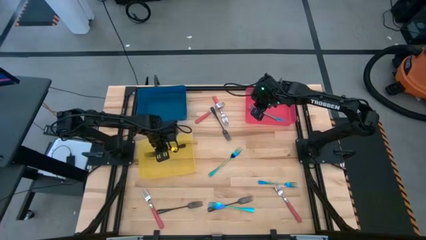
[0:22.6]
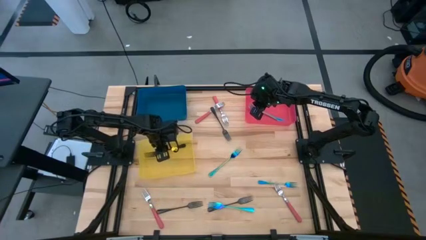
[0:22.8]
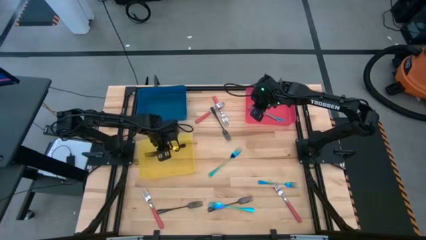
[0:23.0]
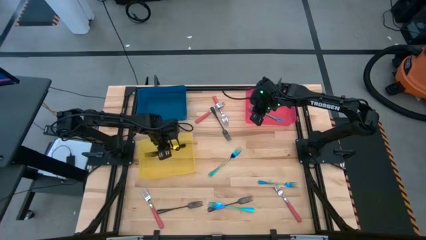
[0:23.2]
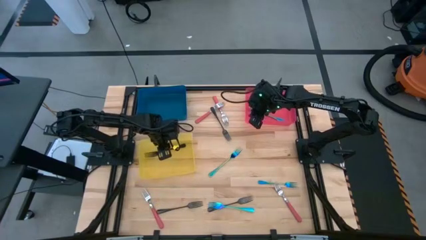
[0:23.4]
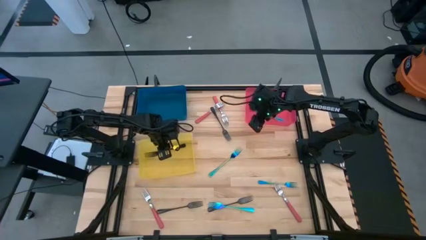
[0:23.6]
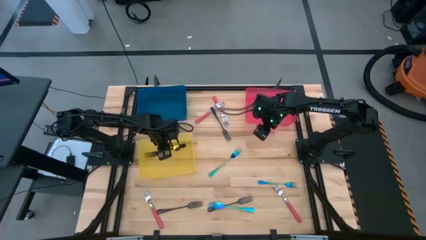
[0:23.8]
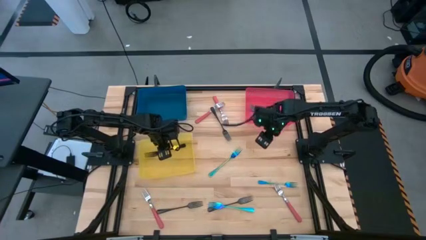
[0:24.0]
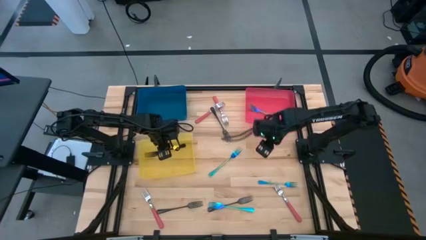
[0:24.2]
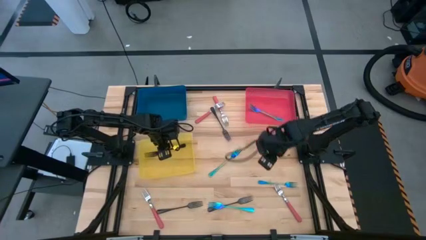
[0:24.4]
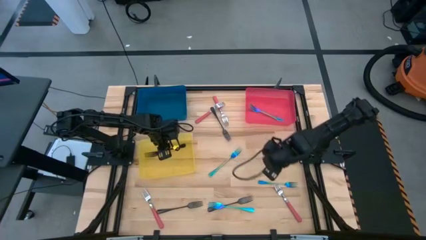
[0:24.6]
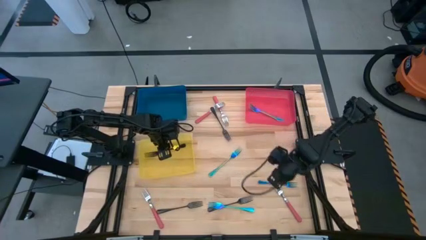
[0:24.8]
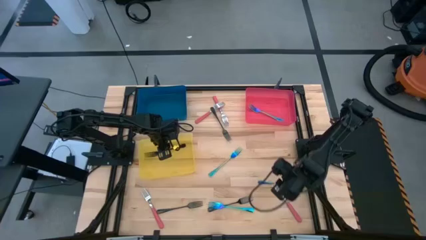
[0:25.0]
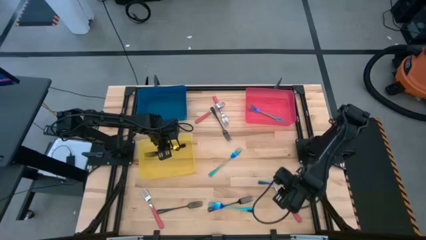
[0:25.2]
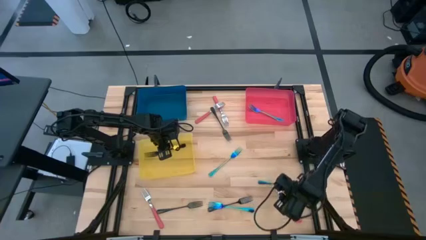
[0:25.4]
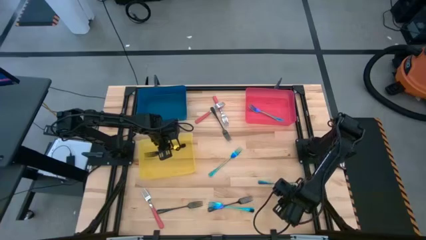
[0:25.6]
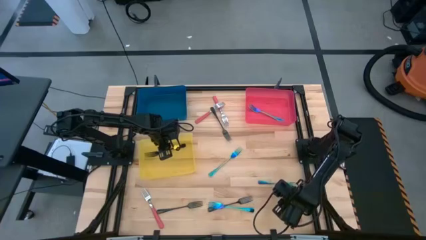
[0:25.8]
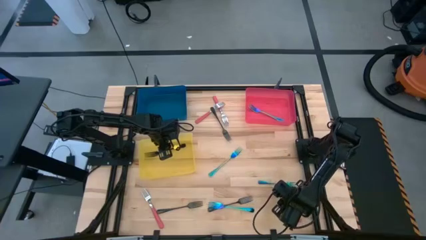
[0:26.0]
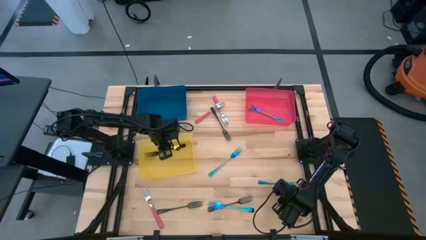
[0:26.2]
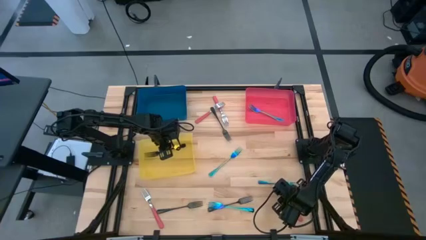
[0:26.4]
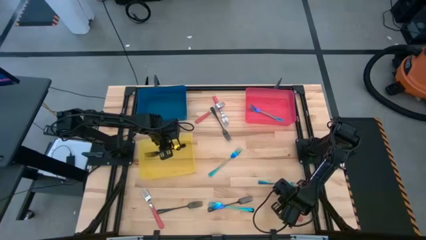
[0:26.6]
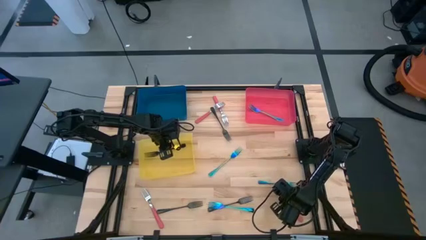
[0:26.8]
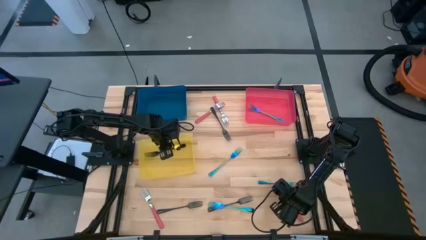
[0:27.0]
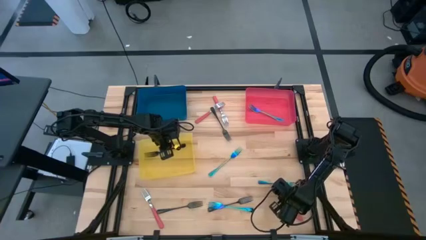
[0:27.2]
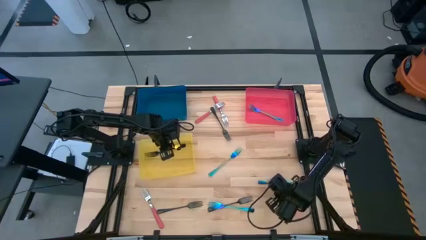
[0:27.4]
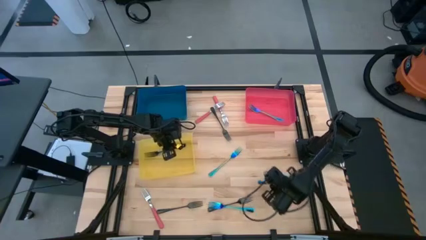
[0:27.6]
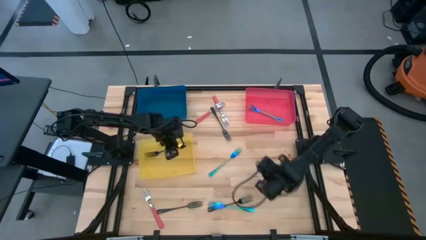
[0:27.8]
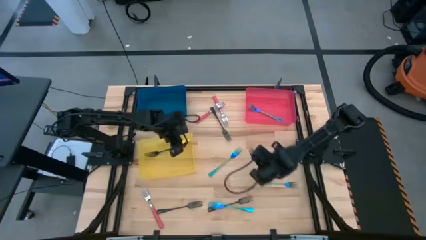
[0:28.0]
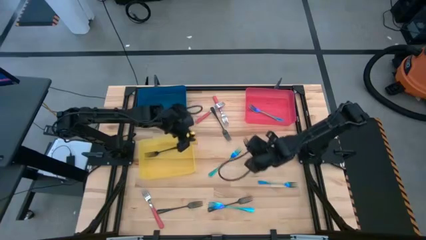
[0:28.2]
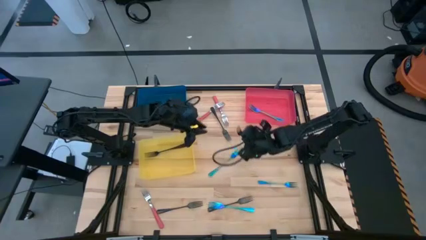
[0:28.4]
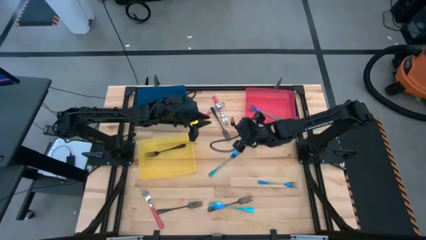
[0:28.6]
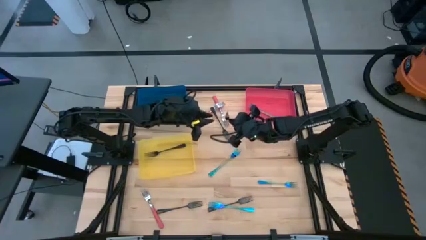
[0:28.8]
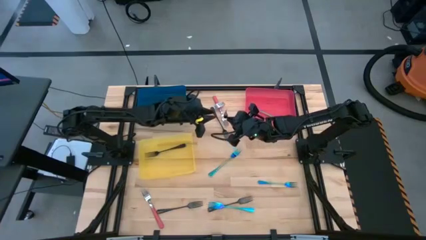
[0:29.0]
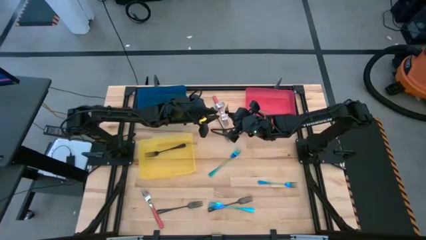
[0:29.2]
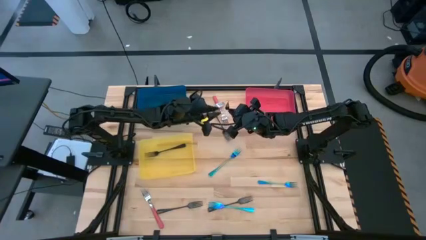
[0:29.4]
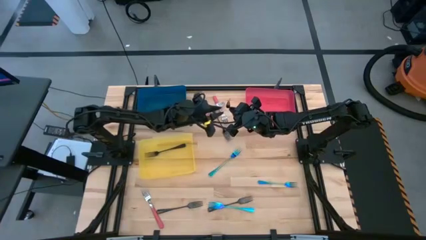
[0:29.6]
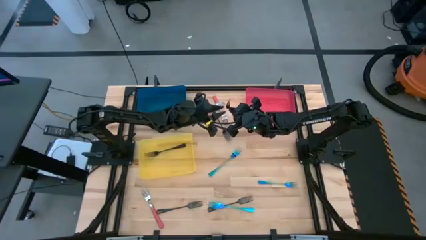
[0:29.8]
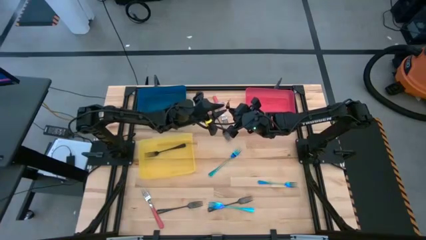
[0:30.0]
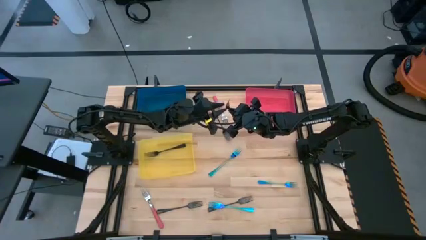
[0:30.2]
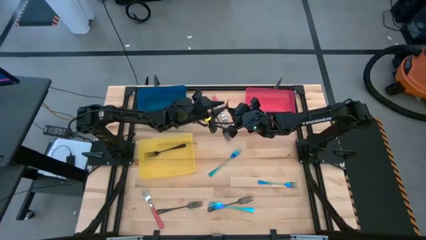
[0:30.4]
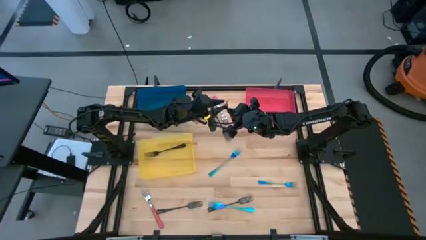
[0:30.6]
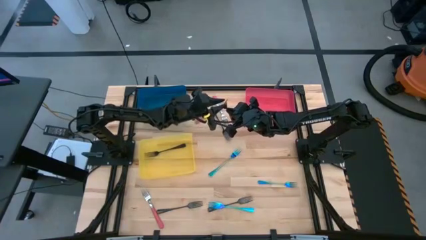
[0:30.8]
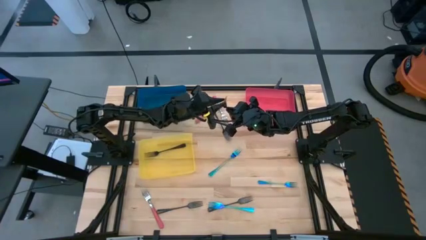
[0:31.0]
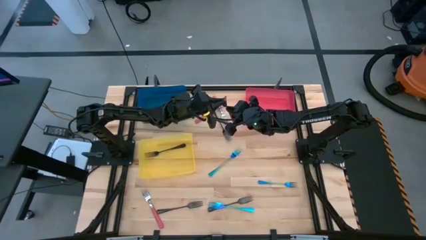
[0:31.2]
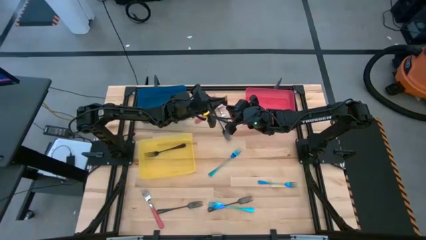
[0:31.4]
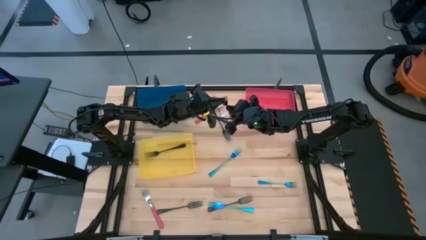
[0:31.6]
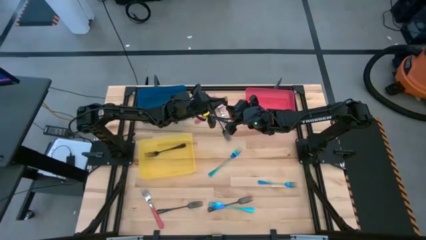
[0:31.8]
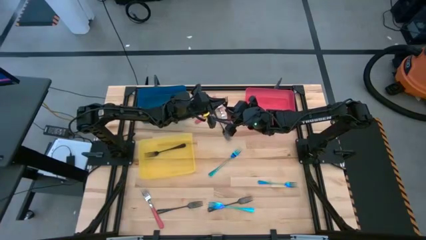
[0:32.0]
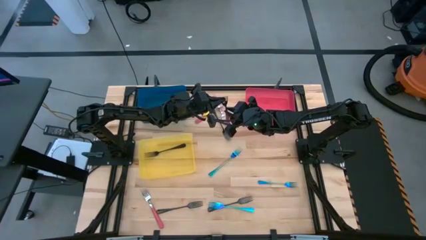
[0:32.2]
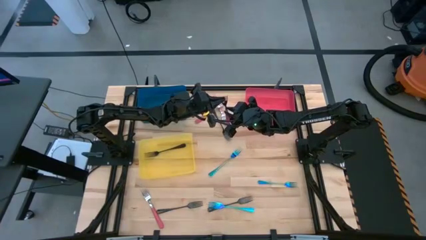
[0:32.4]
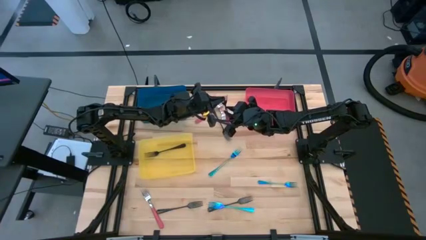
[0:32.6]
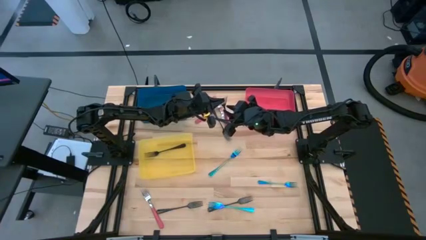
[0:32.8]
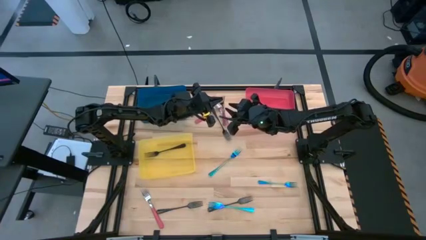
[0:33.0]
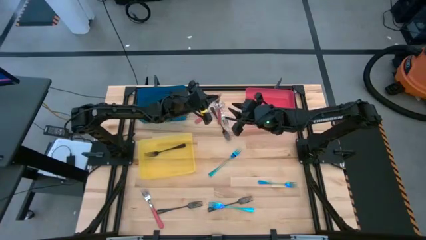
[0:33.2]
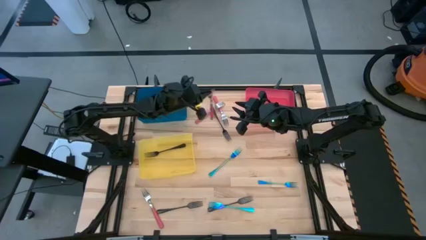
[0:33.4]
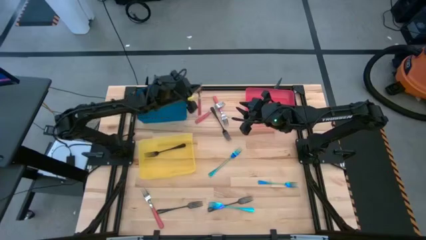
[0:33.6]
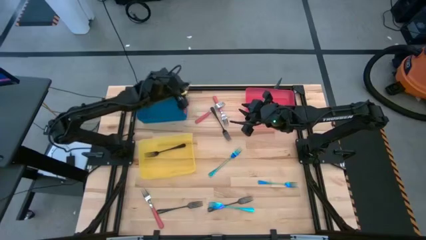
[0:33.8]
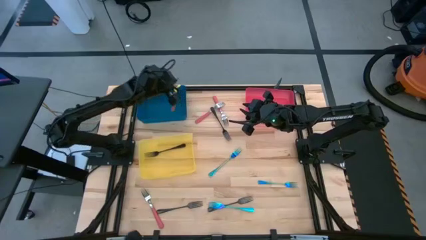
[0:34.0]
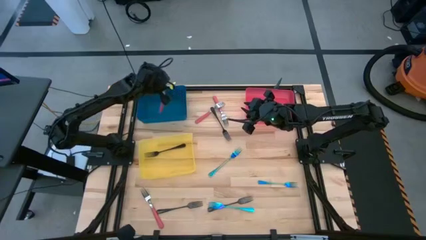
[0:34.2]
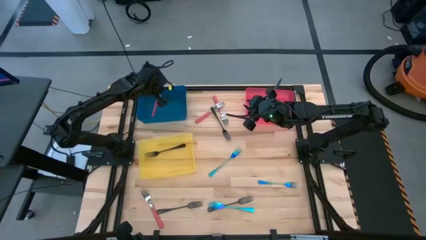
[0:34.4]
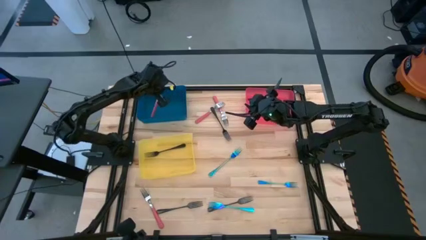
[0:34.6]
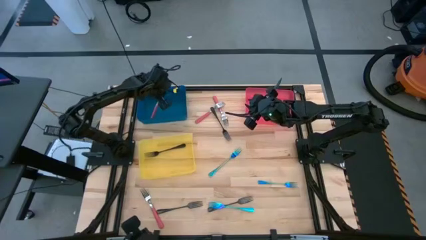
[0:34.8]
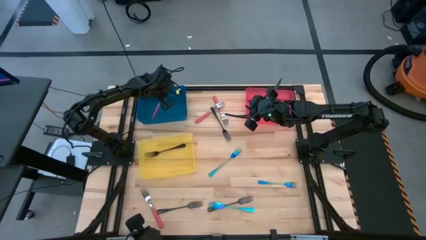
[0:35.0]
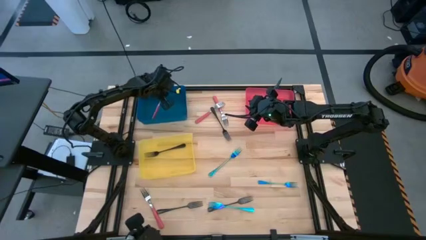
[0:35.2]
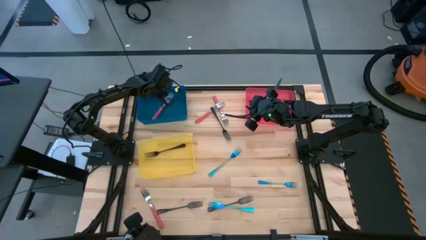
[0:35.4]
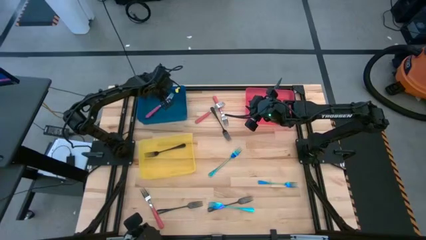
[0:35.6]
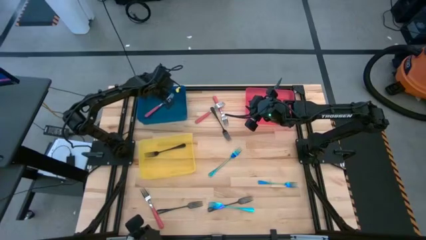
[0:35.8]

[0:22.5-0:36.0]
Task: Sort silverware by color (type)
Put the bottom right pink fork into the blue bin

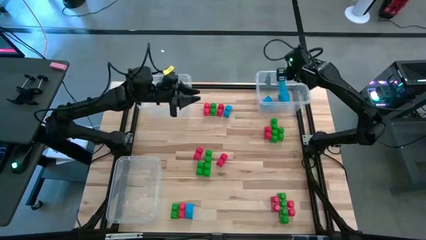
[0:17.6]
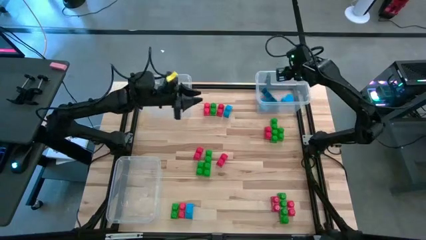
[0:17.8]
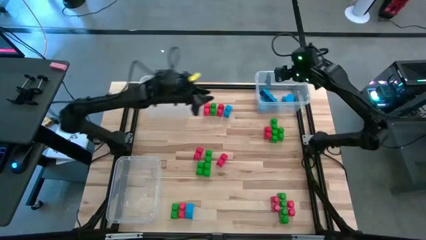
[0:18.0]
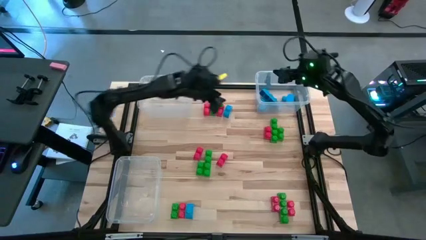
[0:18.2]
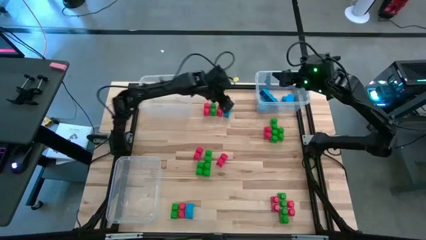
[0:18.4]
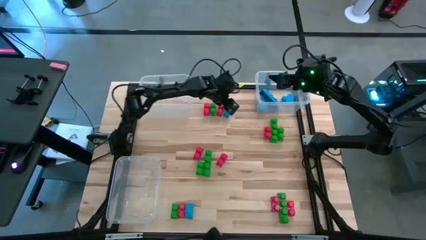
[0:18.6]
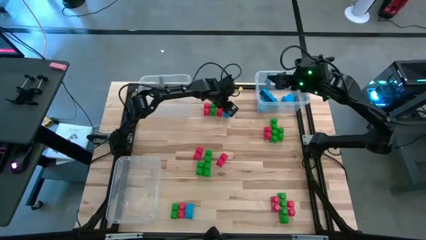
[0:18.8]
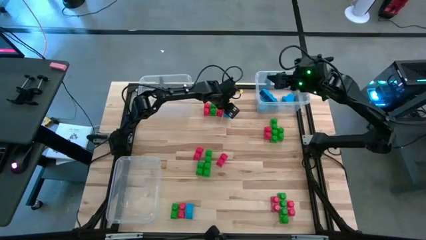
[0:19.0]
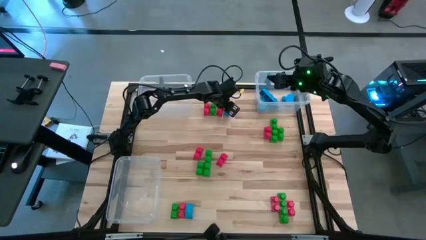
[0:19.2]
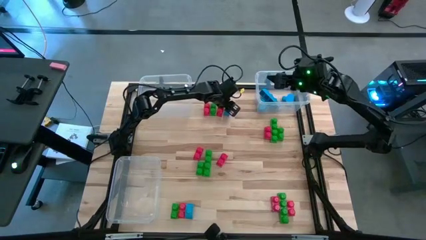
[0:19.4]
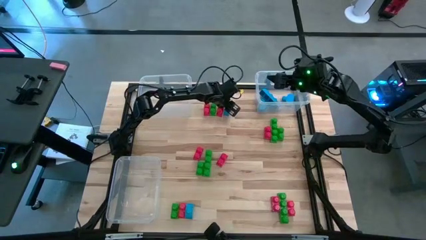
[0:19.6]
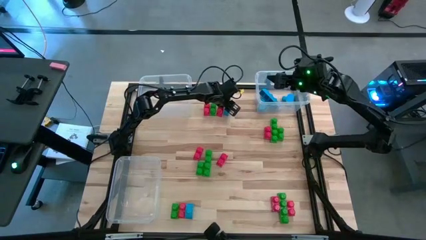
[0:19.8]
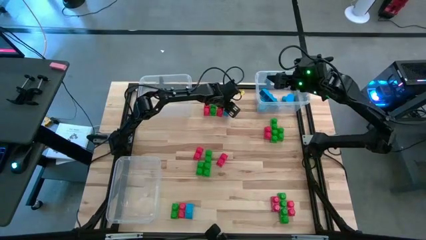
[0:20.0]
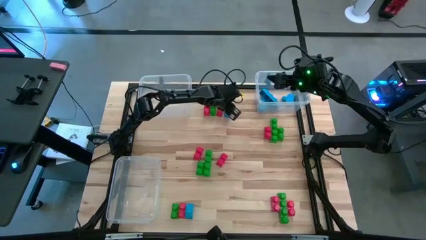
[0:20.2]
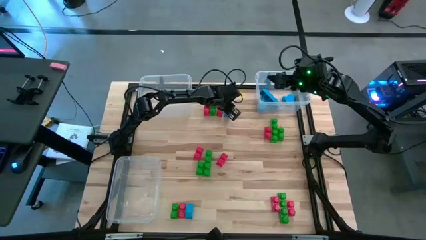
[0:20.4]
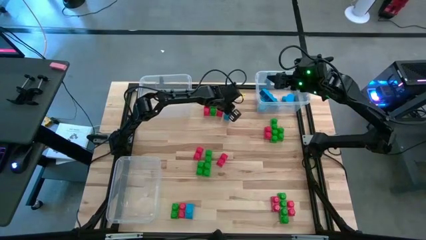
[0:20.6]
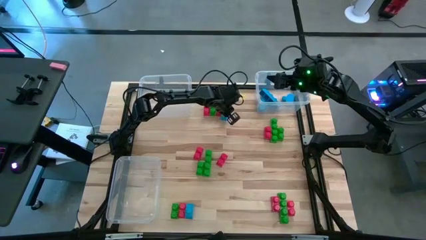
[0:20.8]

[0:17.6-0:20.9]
Task: Sort blocks
Put the blue game piece into the top right transparent bin
